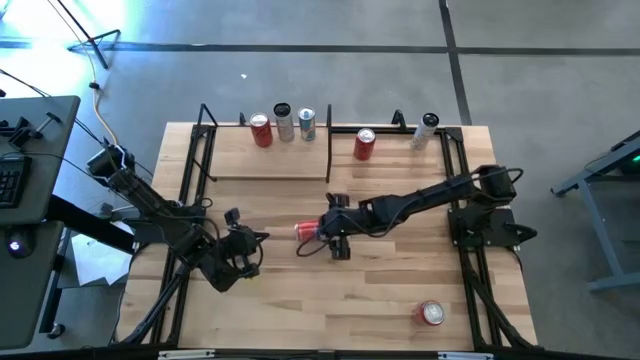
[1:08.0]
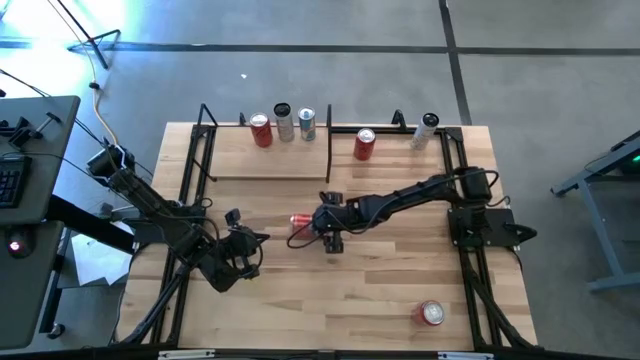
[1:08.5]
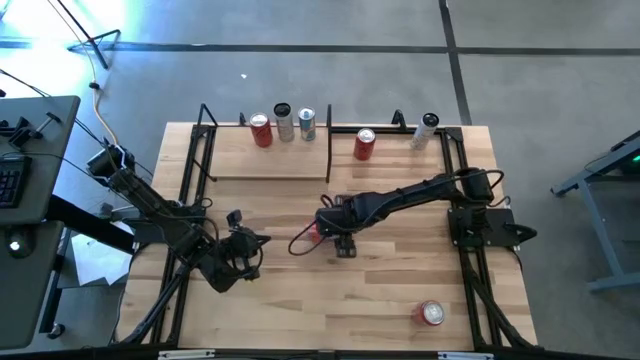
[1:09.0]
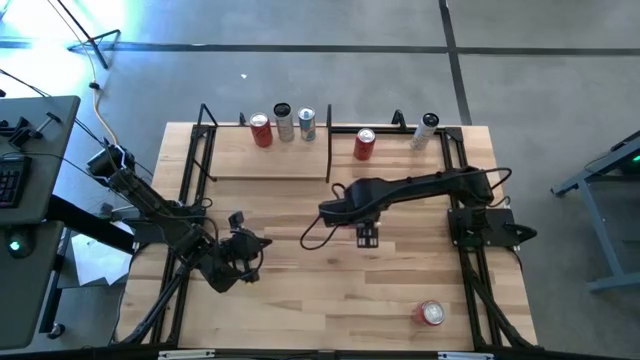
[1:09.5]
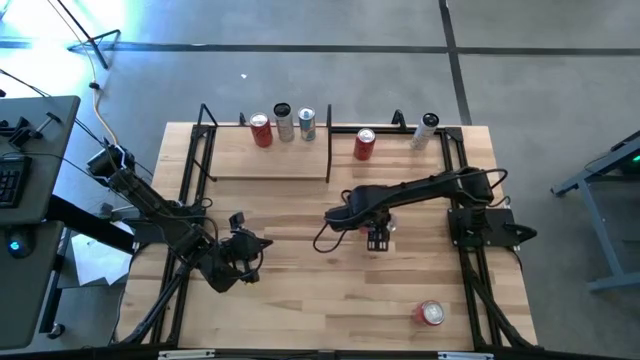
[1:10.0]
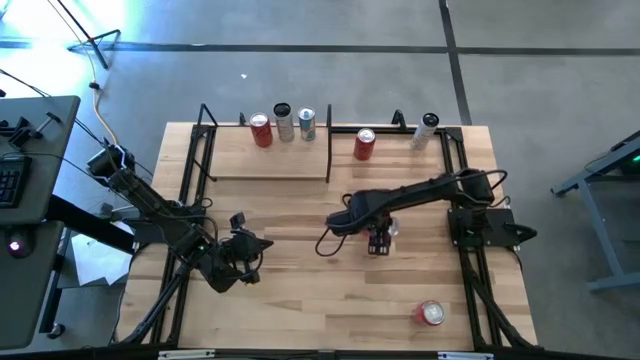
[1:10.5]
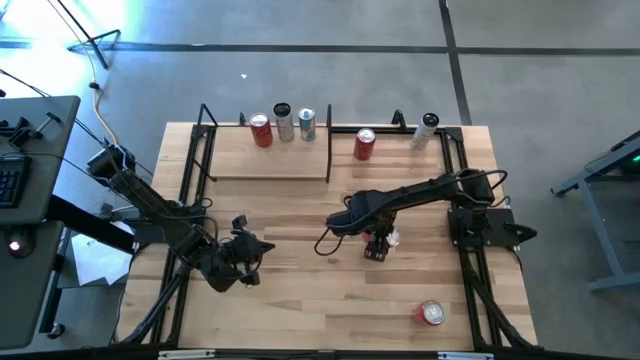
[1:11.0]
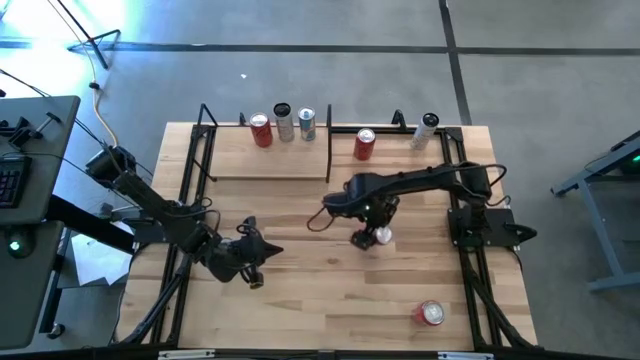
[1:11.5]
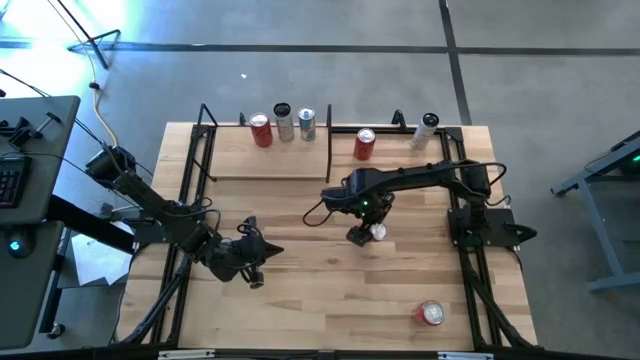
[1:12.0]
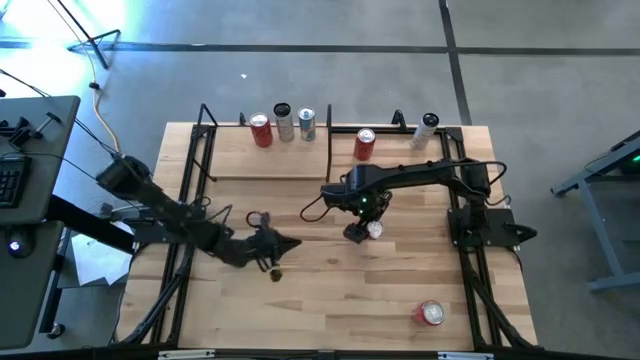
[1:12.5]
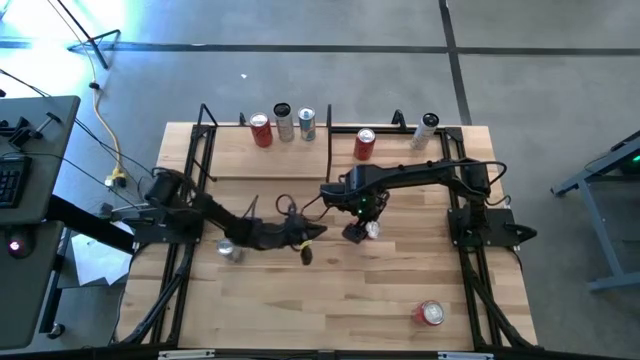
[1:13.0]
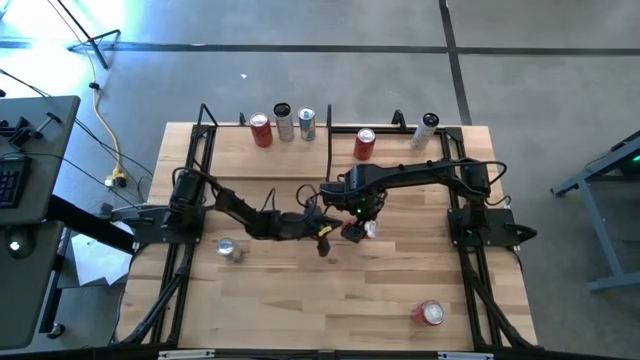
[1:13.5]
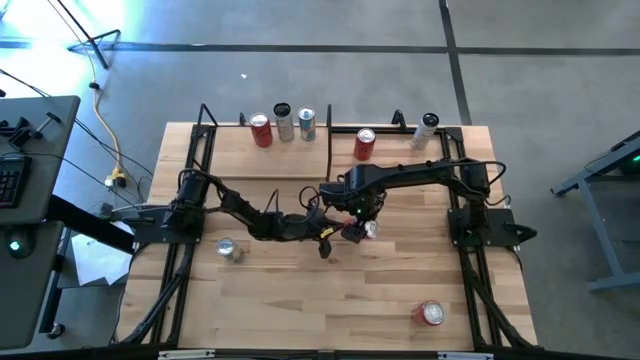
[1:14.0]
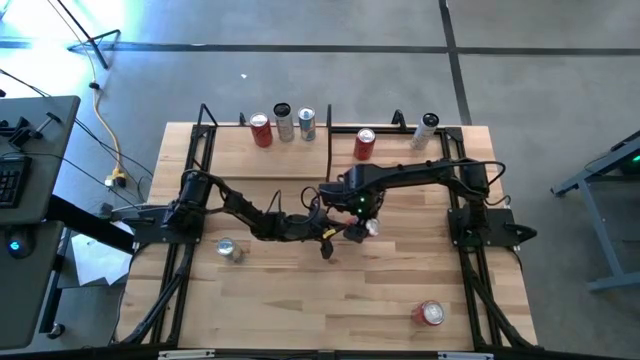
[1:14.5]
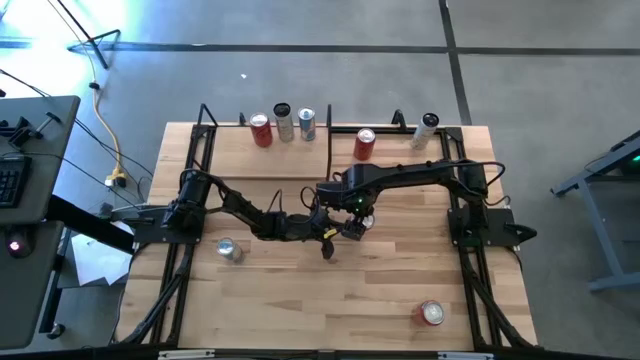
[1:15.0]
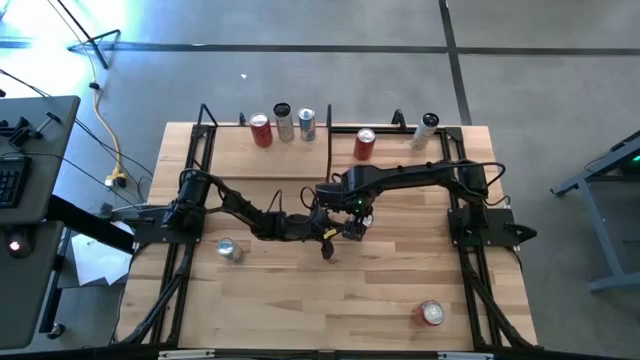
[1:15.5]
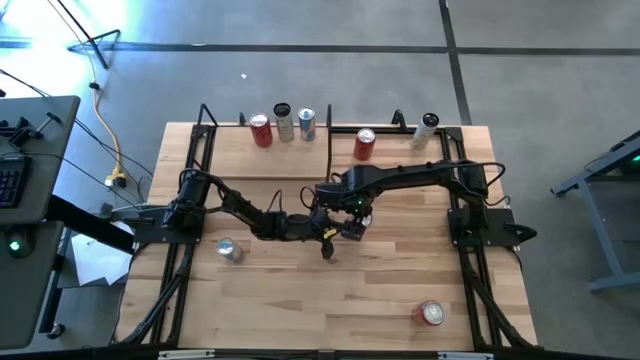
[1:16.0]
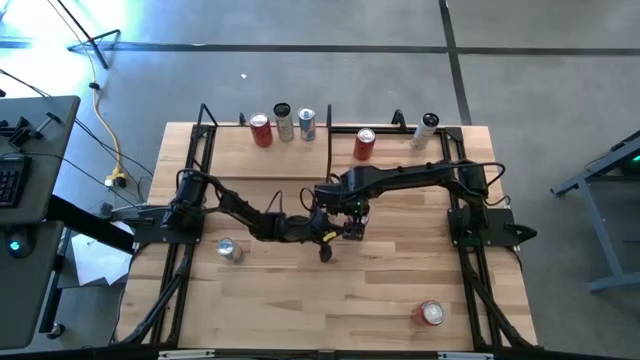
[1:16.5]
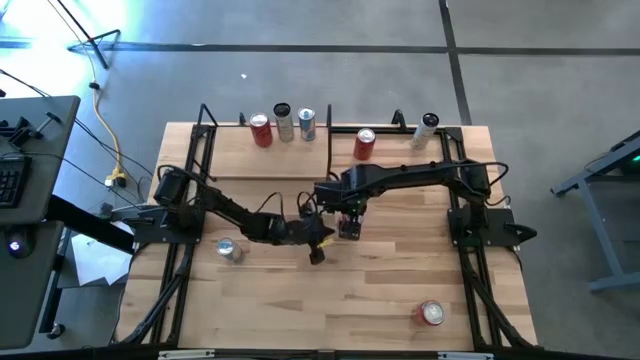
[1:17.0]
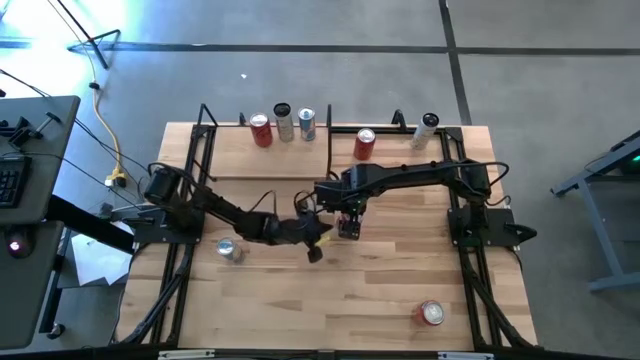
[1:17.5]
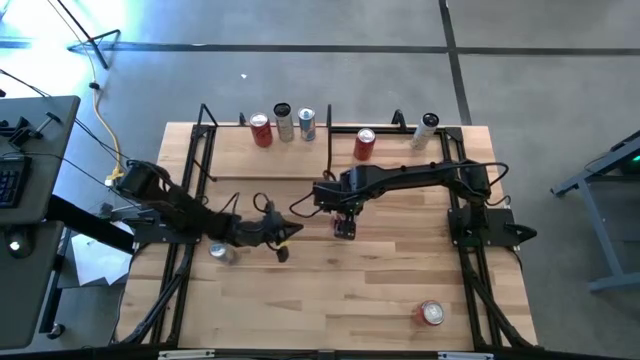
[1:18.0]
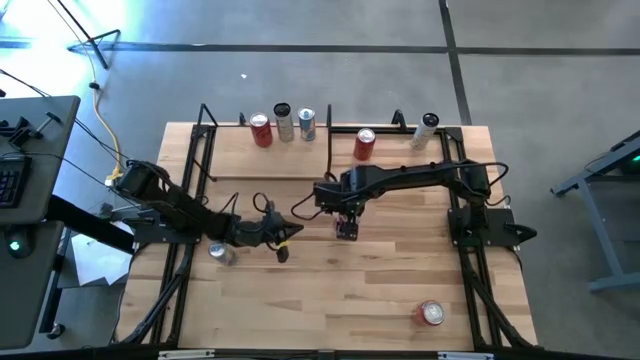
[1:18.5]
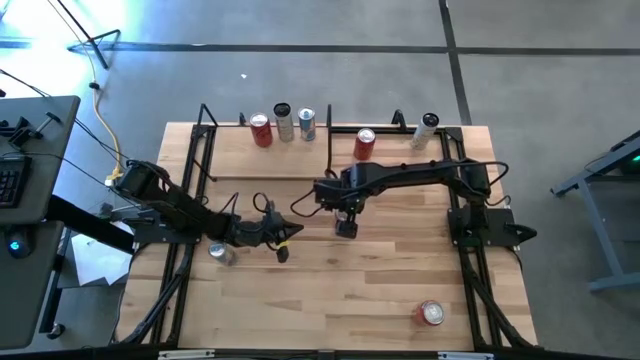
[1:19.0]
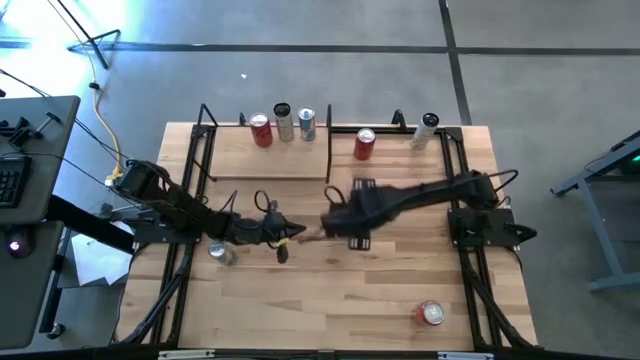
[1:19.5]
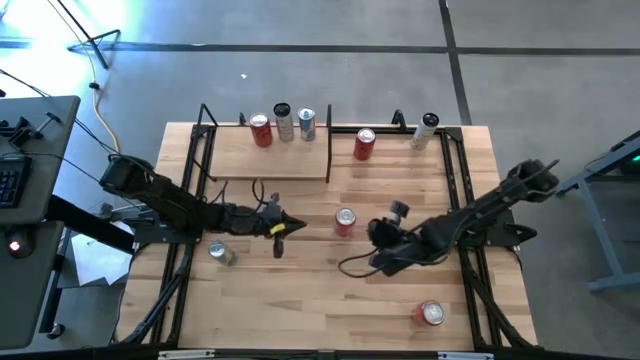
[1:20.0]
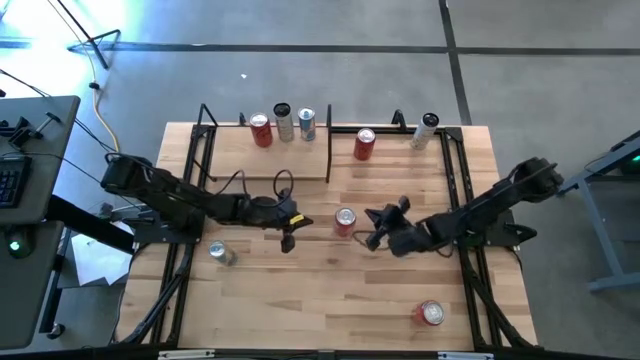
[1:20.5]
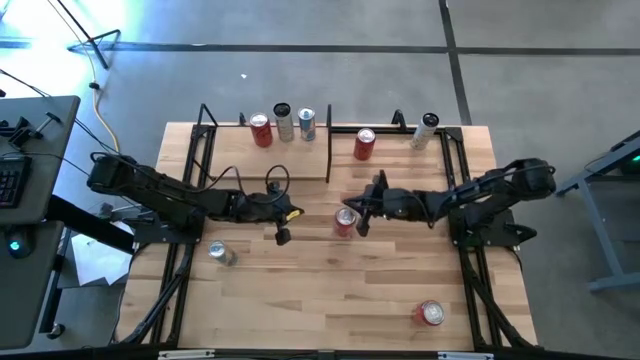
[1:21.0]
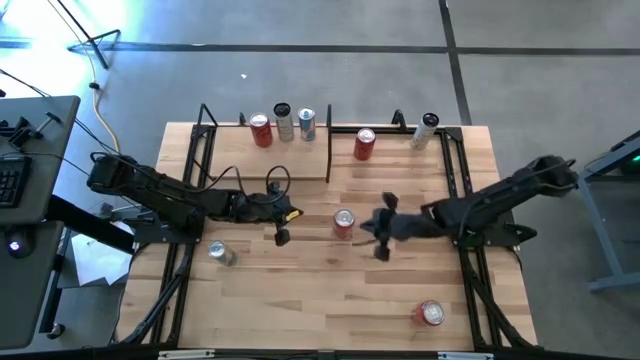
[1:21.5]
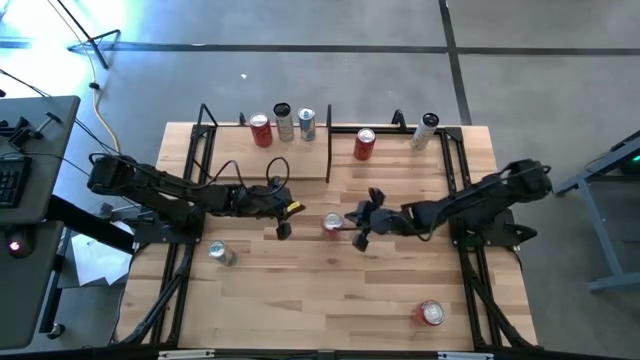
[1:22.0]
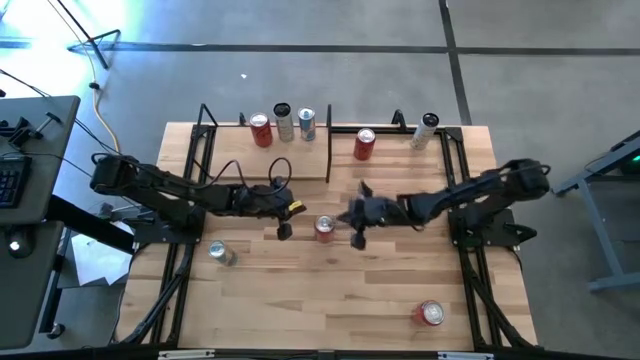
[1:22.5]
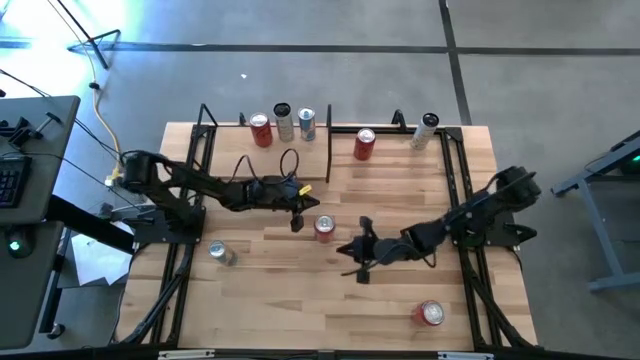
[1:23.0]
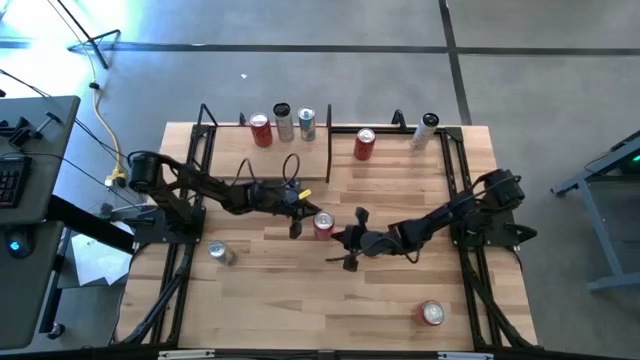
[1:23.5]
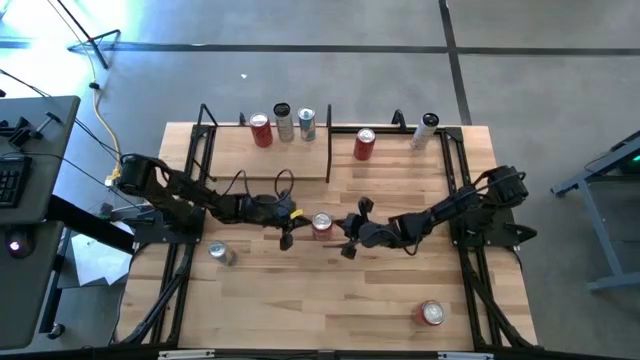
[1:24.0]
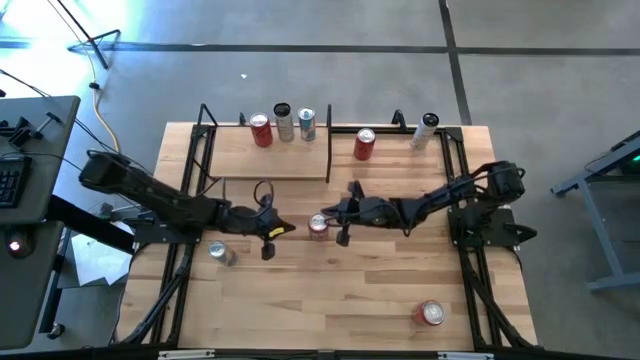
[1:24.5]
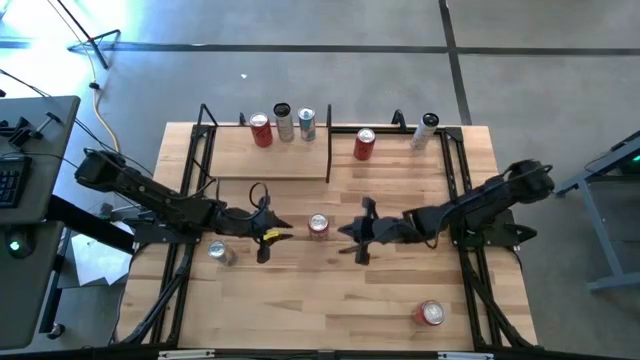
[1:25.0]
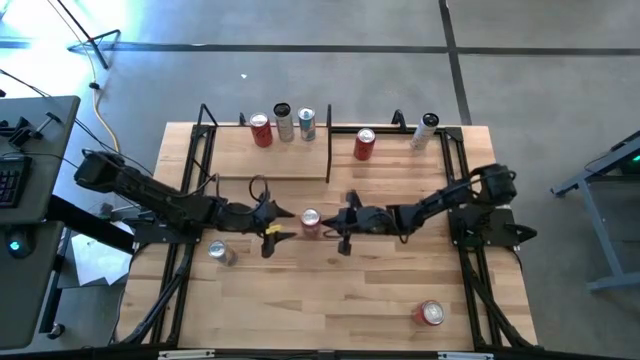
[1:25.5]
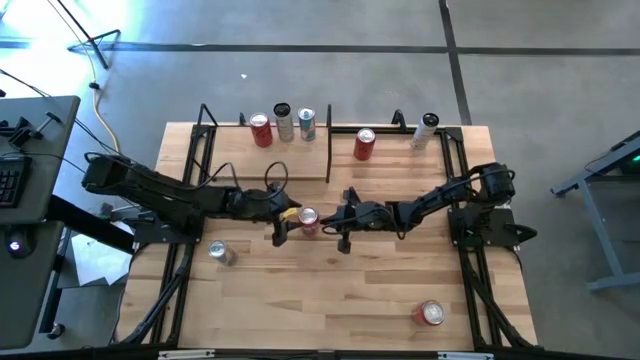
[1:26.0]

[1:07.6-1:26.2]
Task: Place canned beverage on shelf
Put the left red soda can on the shelf

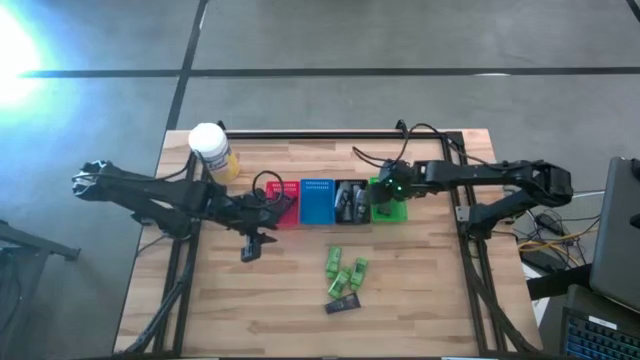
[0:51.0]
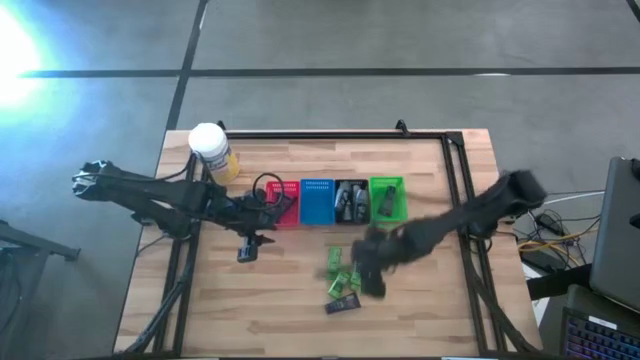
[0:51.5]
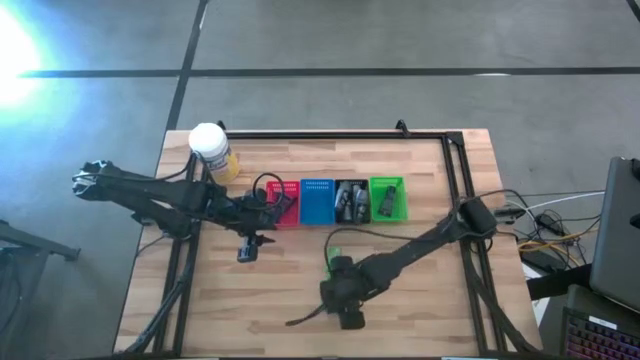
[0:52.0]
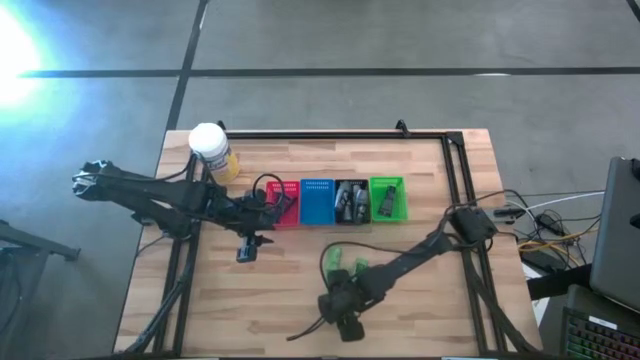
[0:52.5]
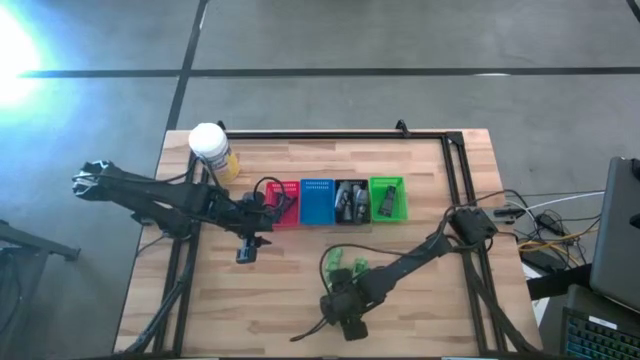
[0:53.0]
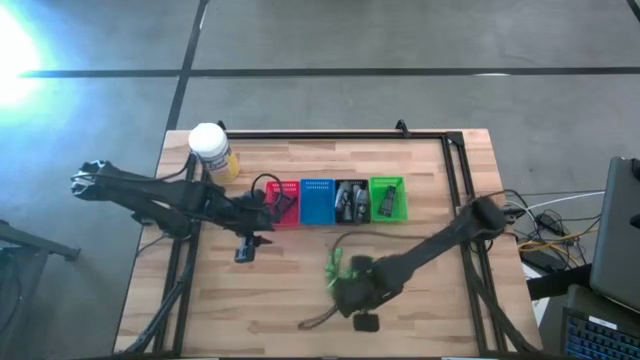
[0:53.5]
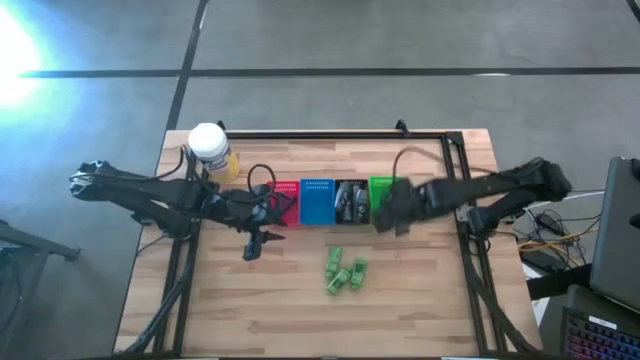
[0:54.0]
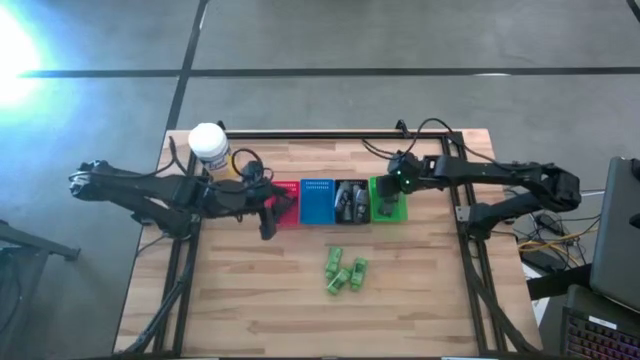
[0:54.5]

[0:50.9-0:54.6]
Task: Pick & Place Travel size toiletries
Put the blue shave cream into the green bin
